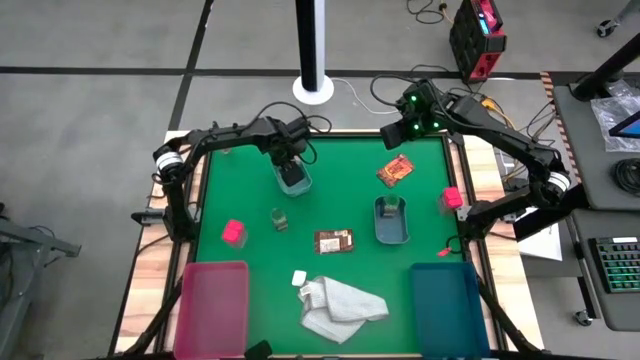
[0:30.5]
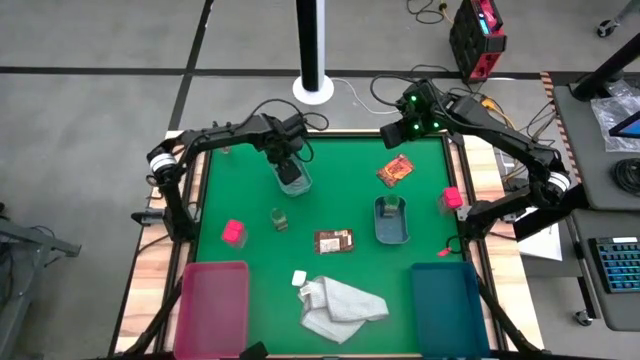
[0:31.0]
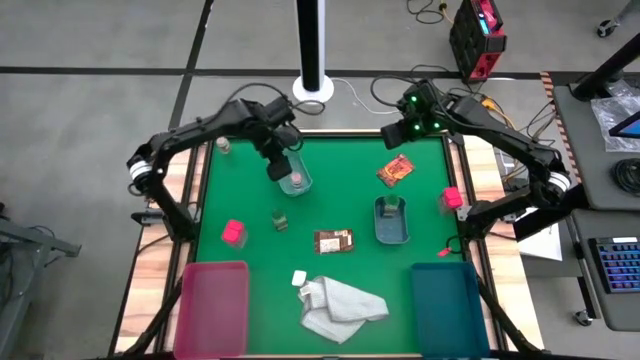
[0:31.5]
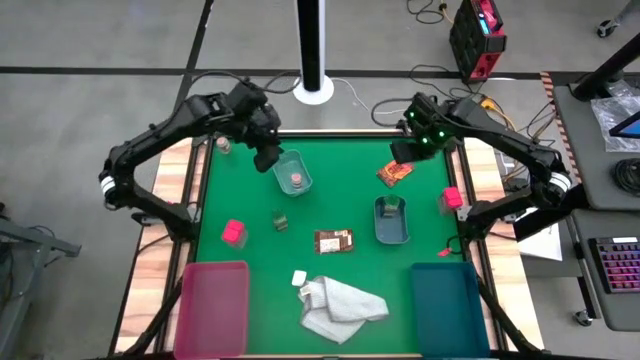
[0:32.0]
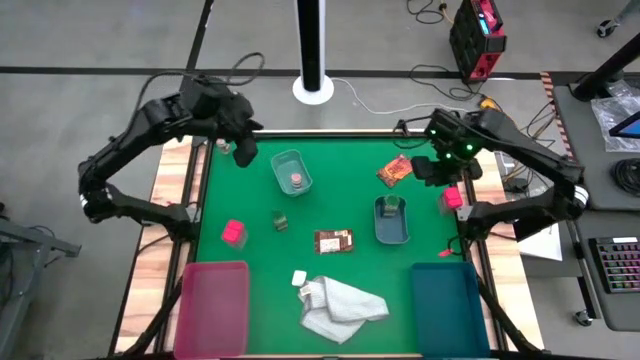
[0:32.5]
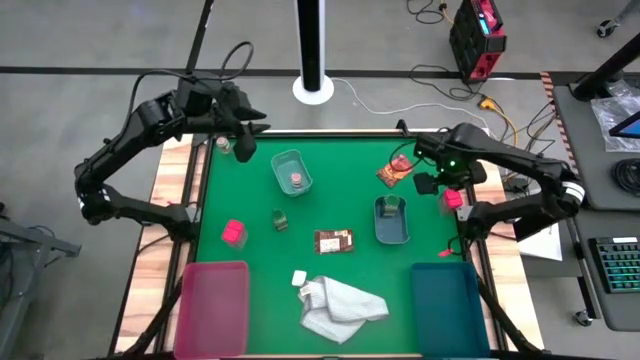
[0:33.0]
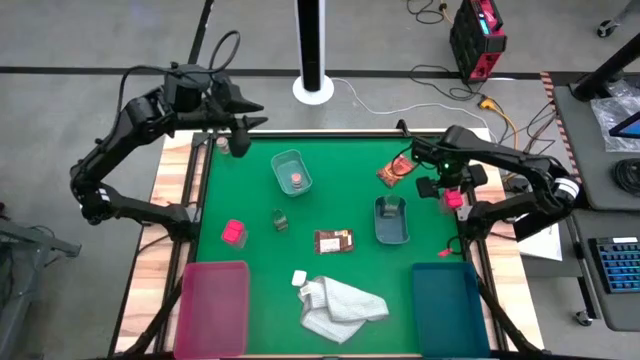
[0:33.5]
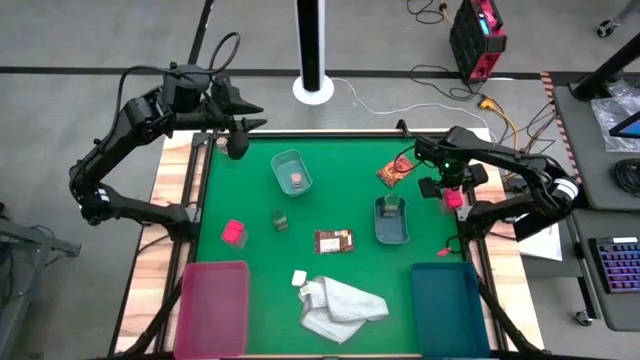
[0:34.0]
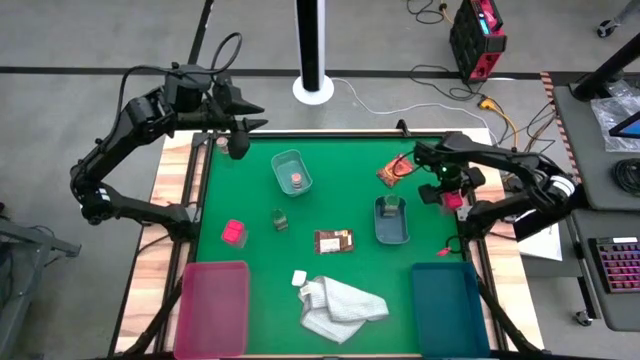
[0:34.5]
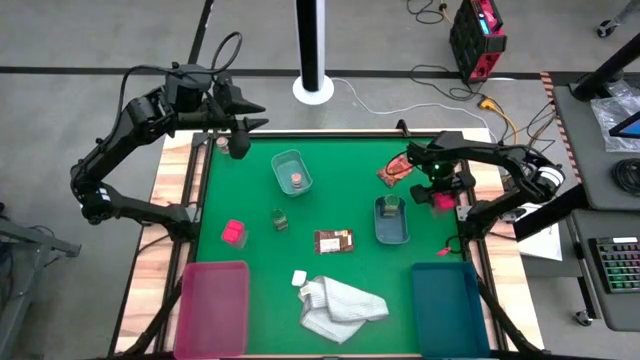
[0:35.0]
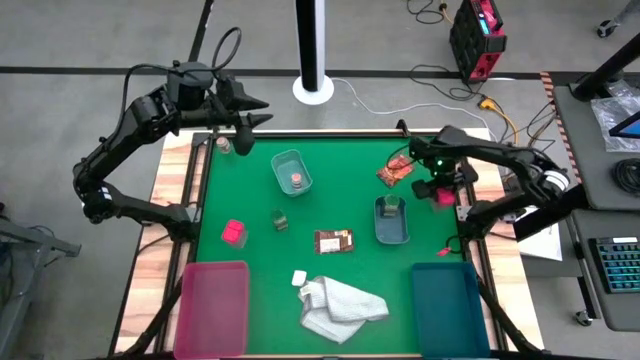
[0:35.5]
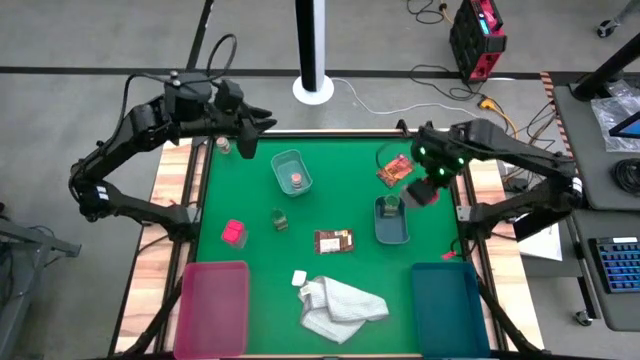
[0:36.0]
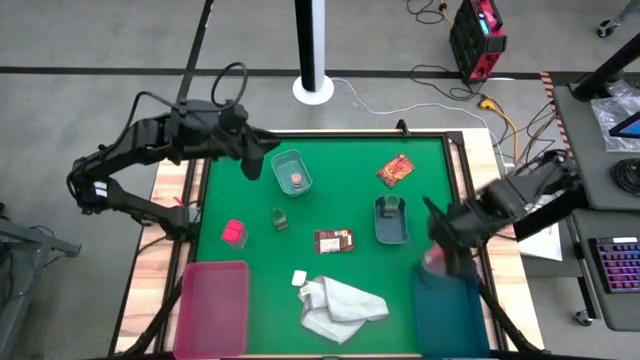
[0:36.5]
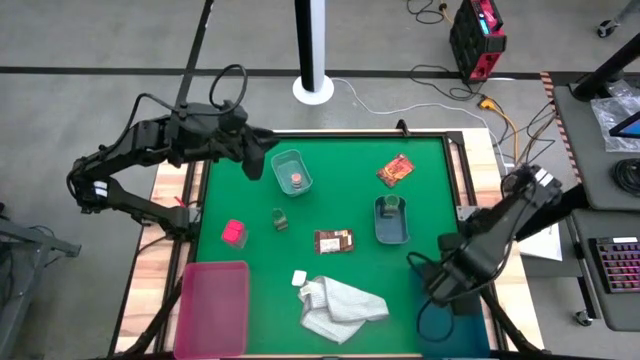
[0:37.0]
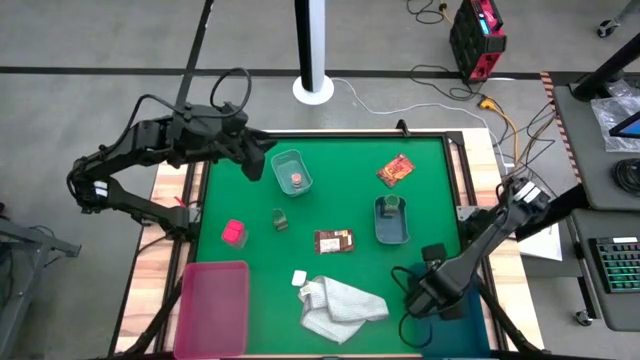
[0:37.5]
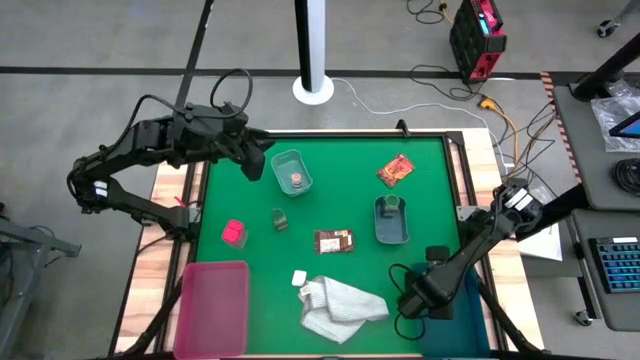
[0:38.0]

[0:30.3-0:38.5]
Task: Sort spices by type
Put the right red spice can into the dark blue bin

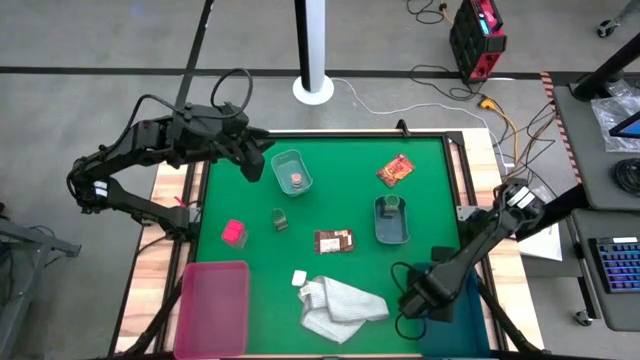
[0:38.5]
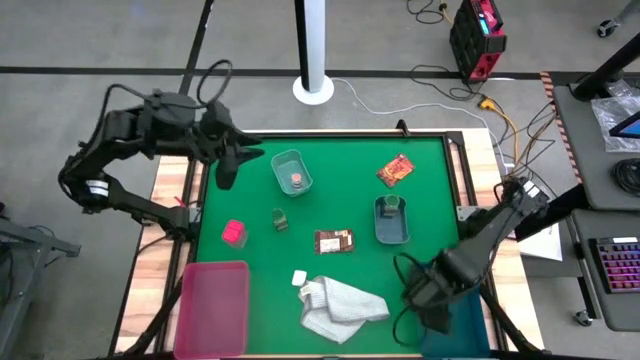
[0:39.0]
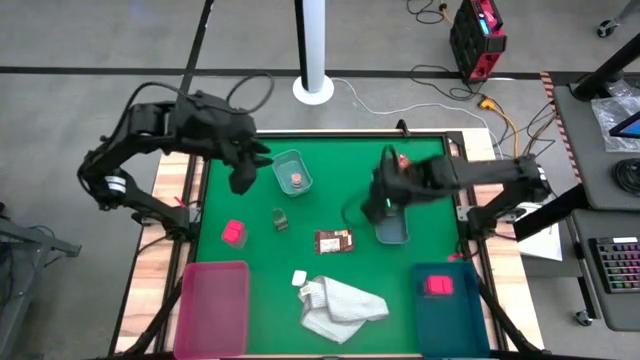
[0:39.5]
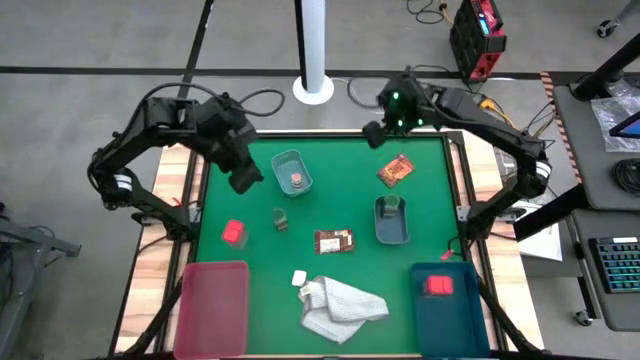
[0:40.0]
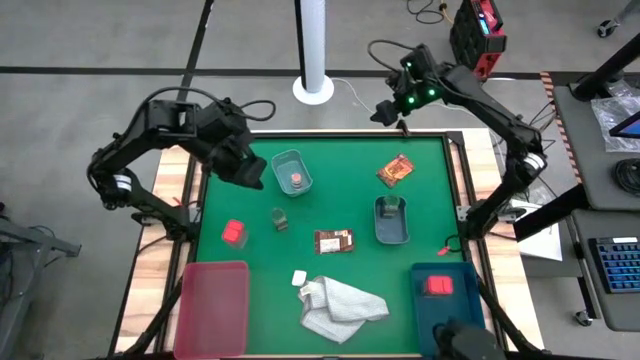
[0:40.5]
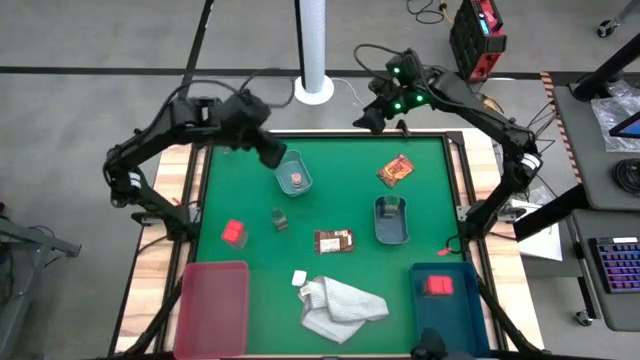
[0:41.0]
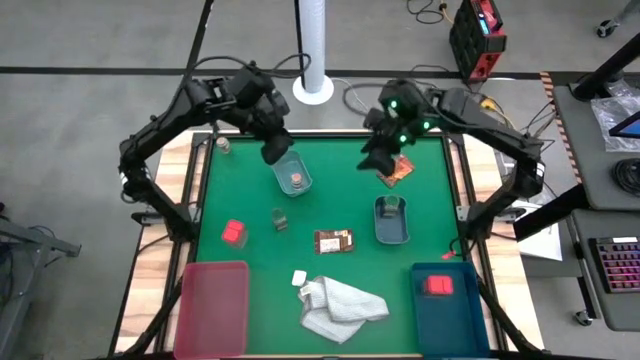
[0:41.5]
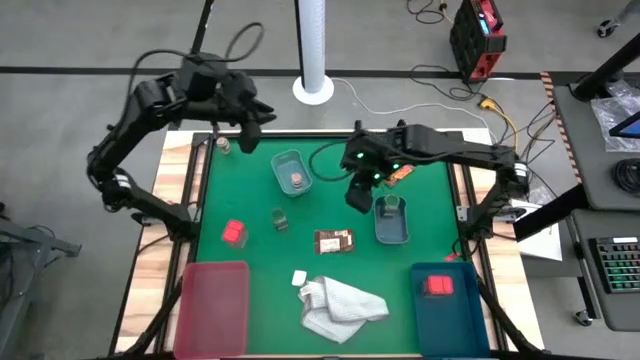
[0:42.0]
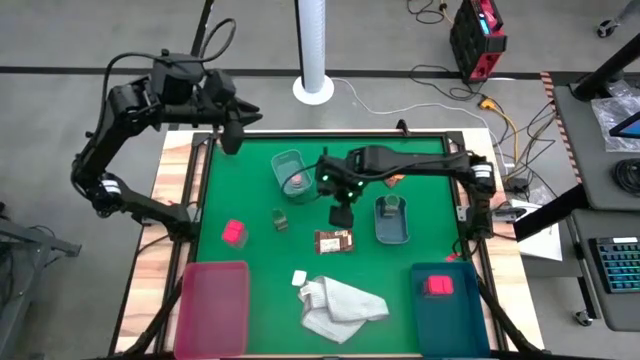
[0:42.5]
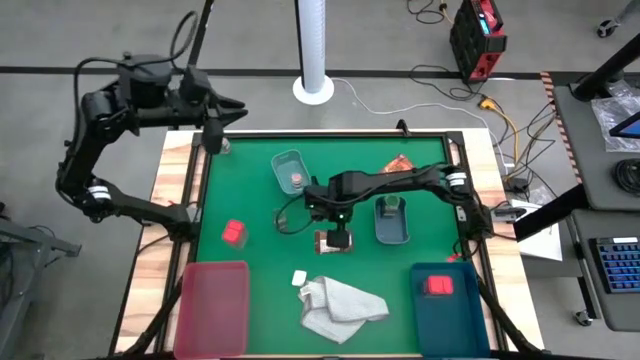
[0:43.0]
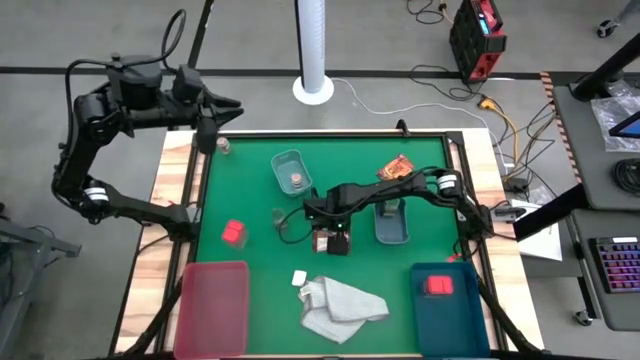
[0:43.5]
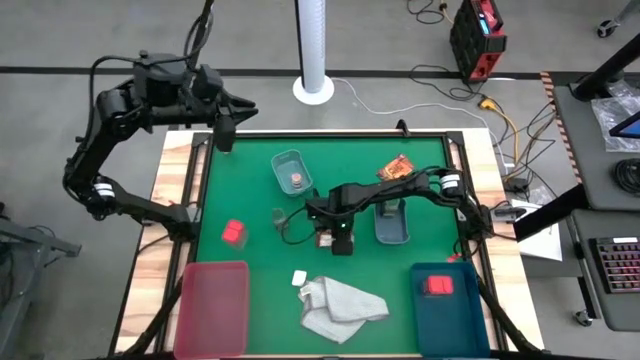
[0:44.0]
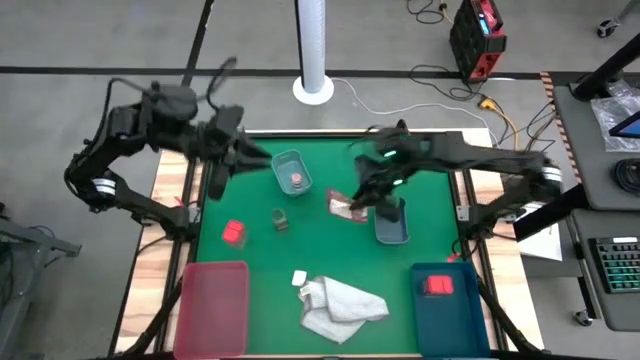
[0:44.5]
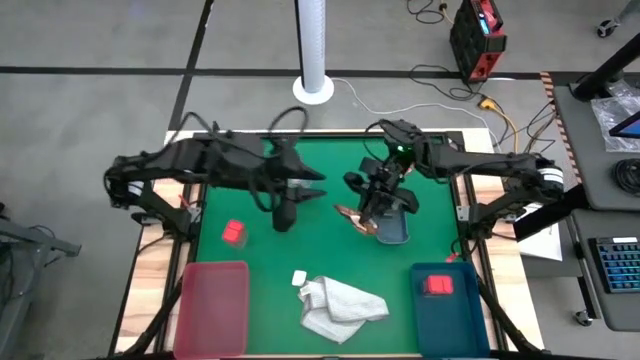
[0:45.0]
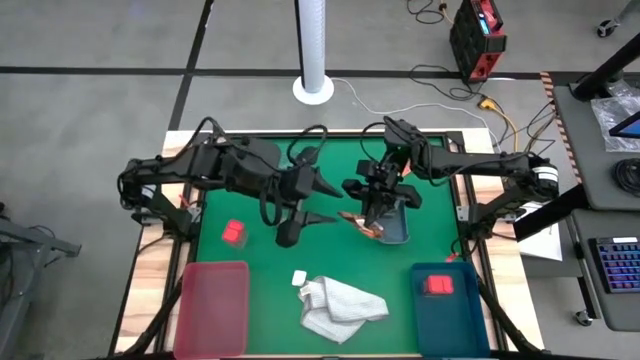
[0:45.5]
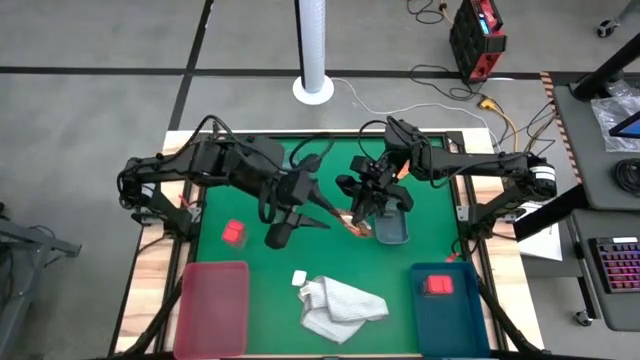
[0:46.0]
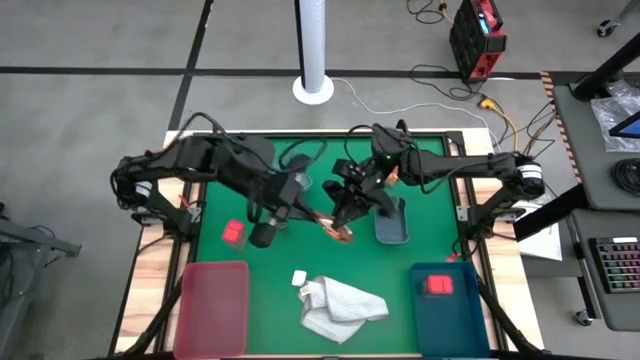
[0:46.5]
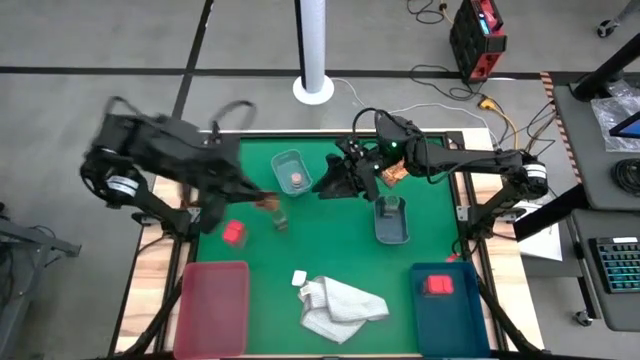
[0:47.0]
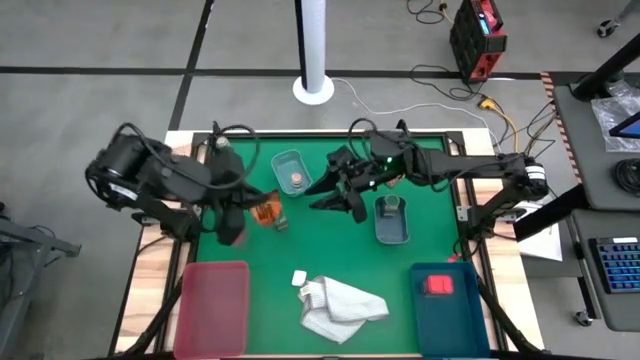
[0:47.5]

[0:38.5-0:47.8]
Put the bottom orange spice pack into the pink bin

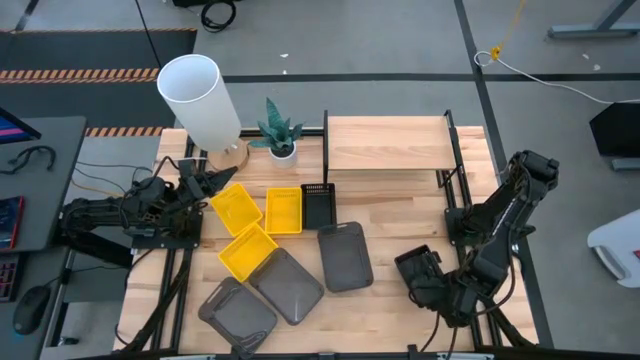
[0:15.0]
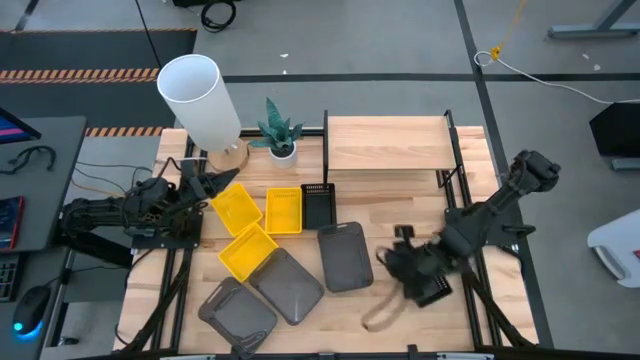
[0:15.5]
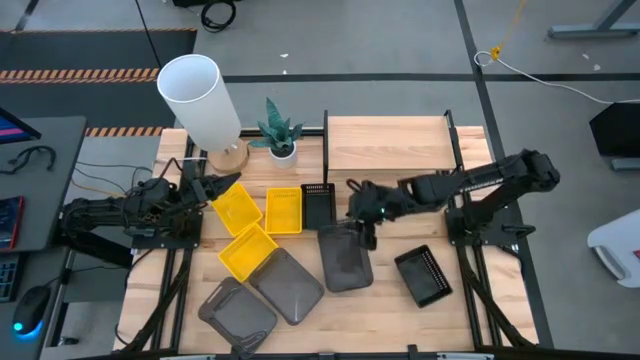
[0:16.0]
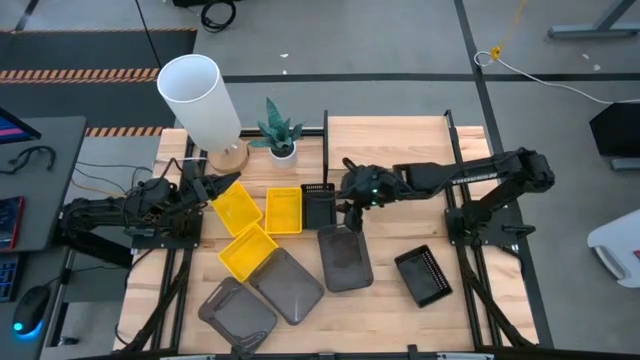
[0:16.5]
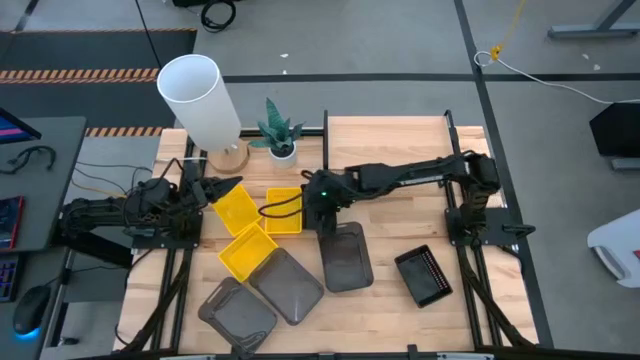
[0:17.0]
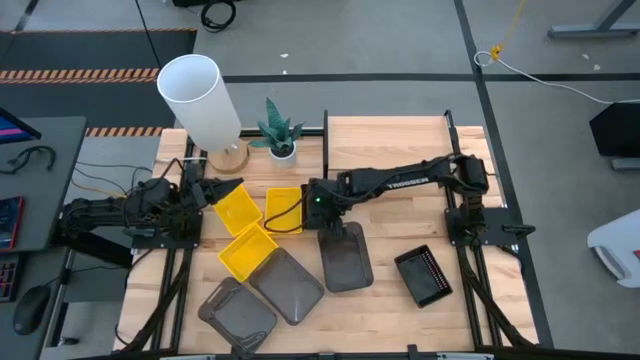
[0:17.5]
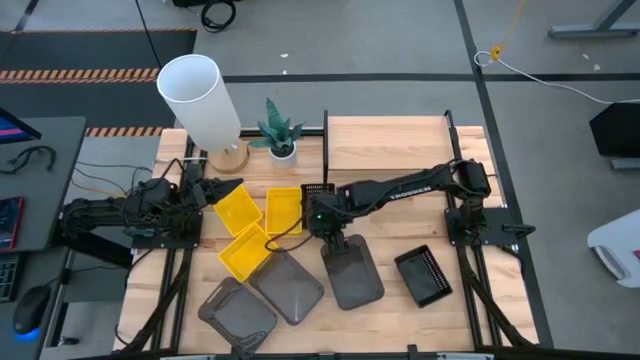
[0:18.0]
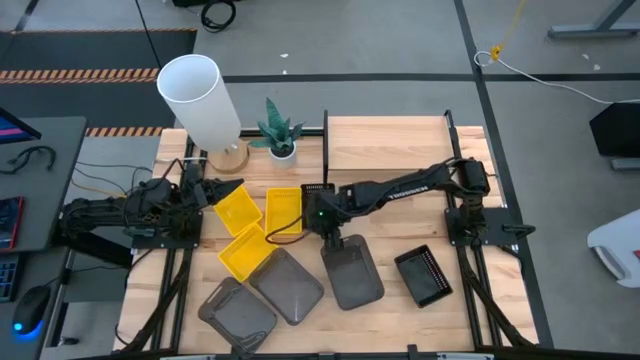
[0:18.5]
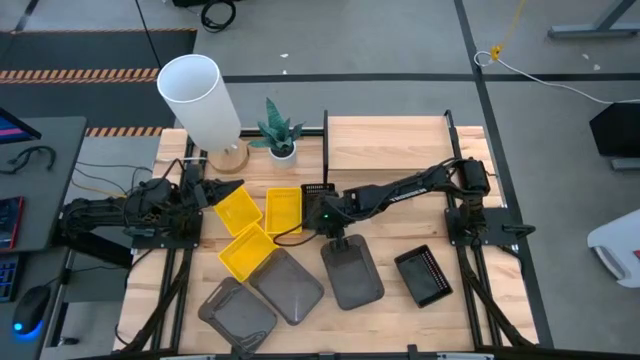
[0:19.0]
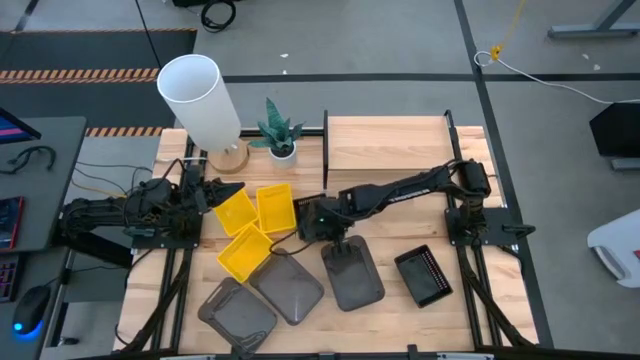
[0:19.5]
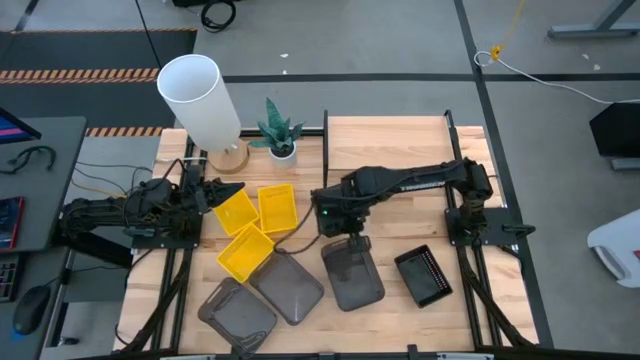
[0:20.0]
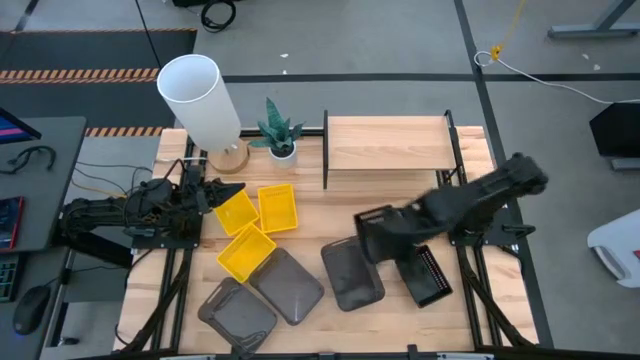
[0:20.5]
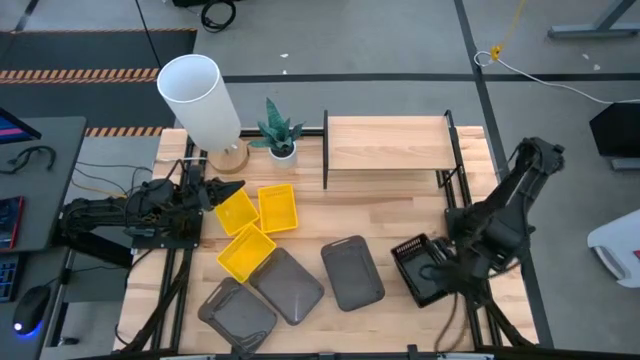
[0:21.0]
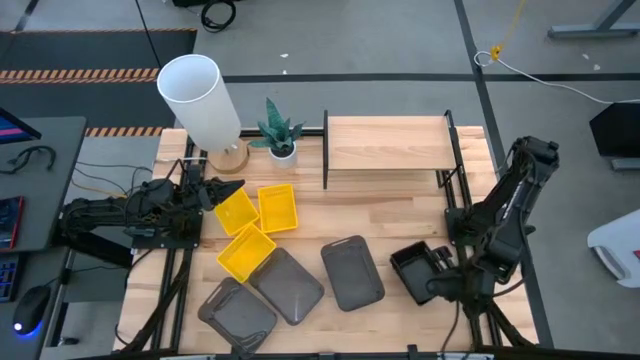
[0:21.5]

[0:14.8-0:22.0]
Task: Stack baskets on shelf by color
Stack the black bin on the stacked black bin
